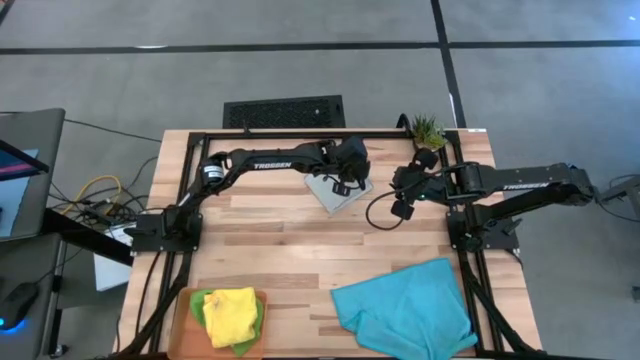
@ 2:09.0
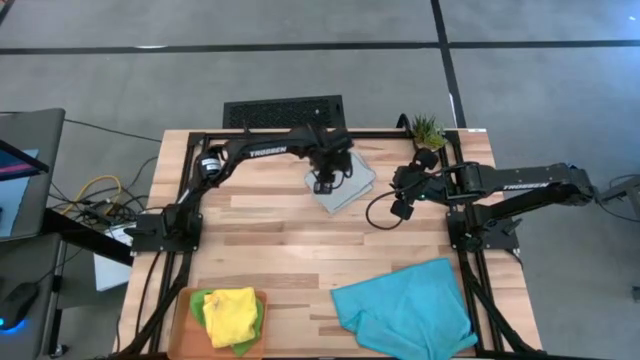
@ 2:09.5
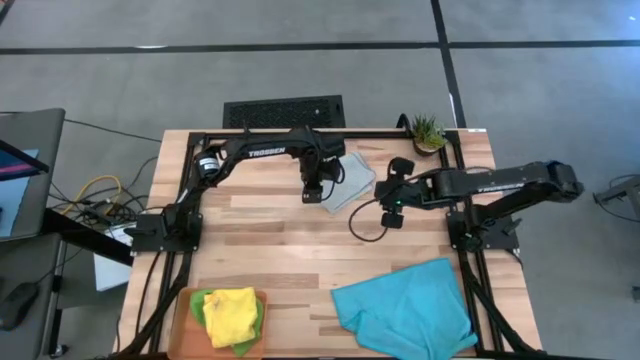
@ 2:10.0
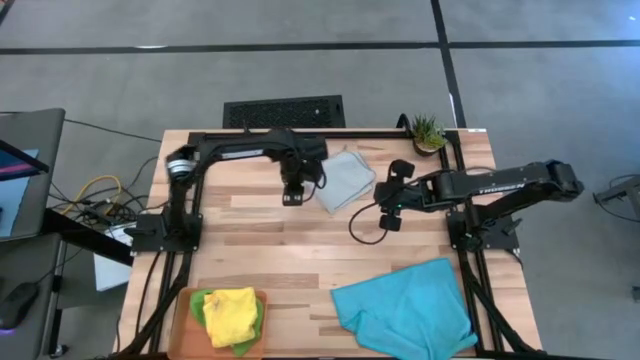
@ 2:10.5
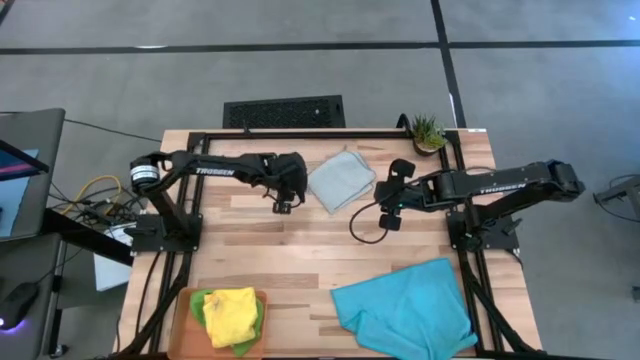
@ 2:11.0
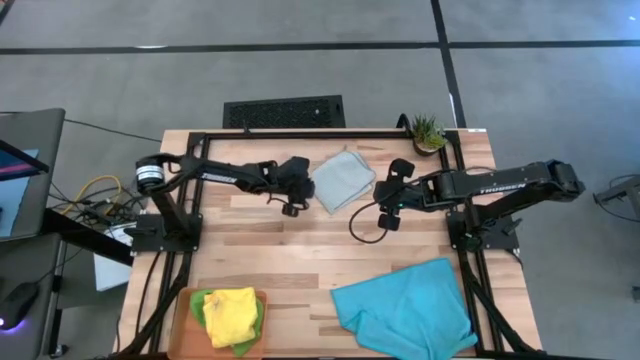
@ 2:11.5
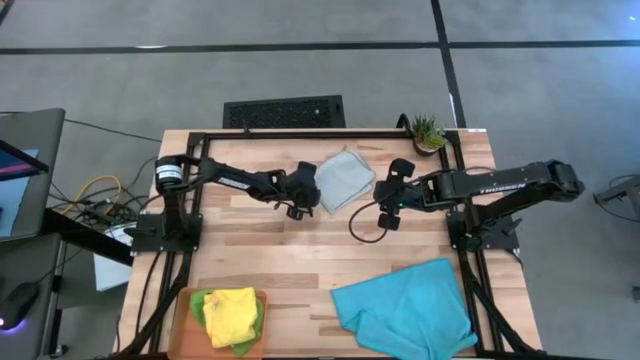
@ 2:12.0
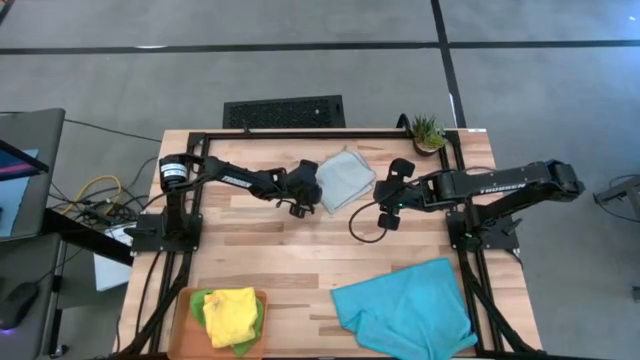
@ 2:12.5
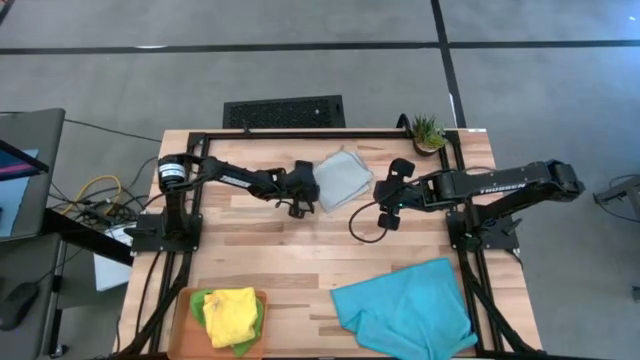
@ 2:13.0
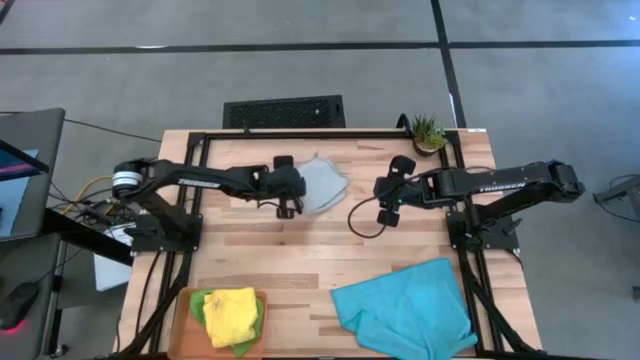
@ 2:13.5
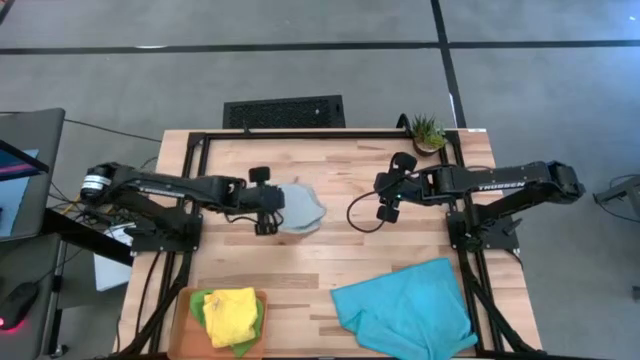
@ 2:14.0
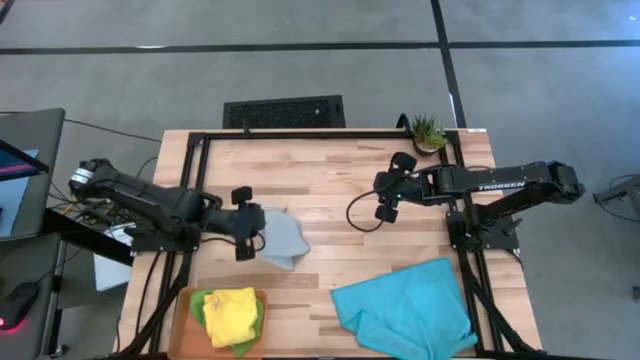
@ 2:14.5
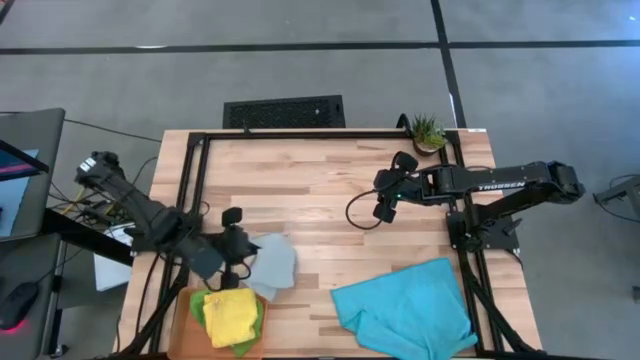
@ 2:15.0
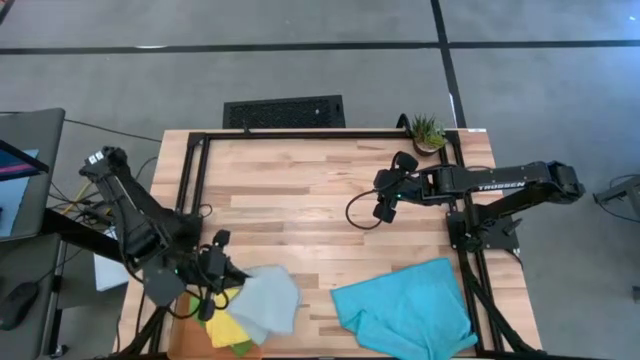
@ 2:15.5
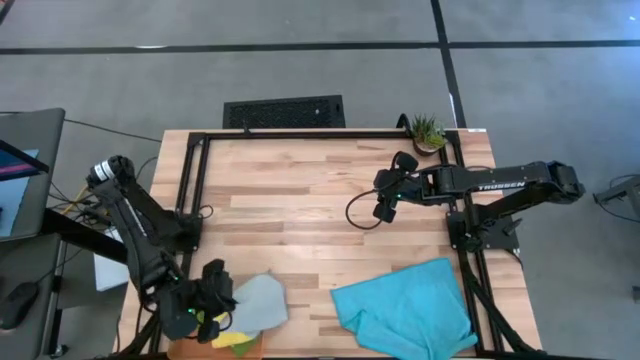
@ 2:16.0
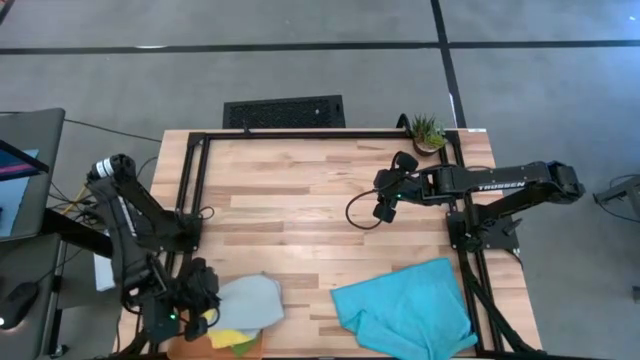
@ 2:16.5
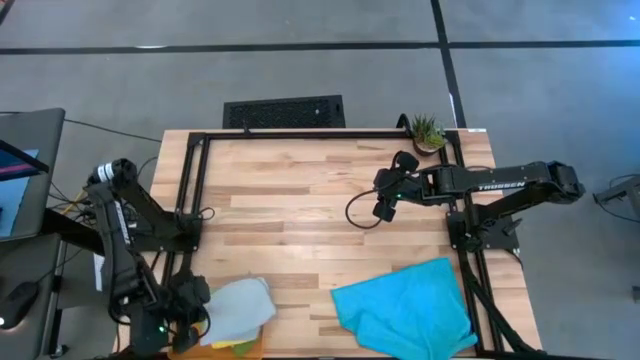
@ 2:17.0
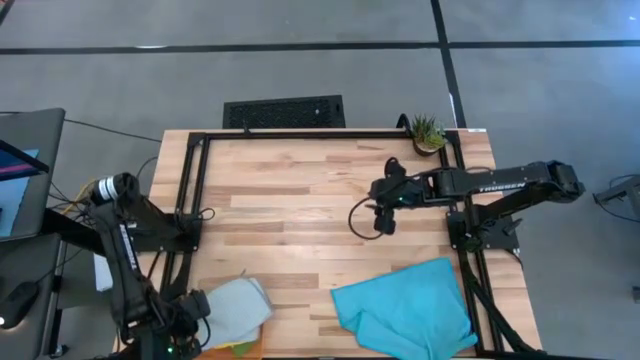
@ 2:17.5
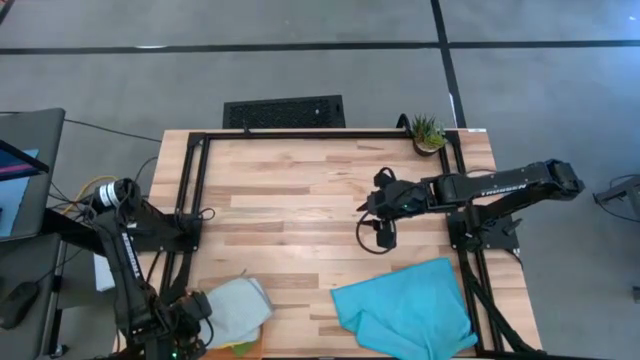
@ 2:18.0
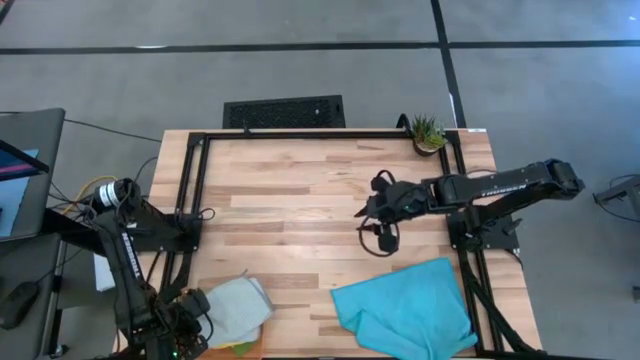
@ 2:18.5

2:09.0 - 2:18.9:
Task: Fold microfiber towels
Put the folded gray towel into the orange bin

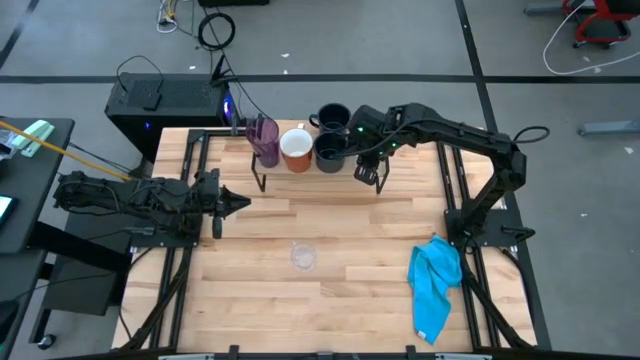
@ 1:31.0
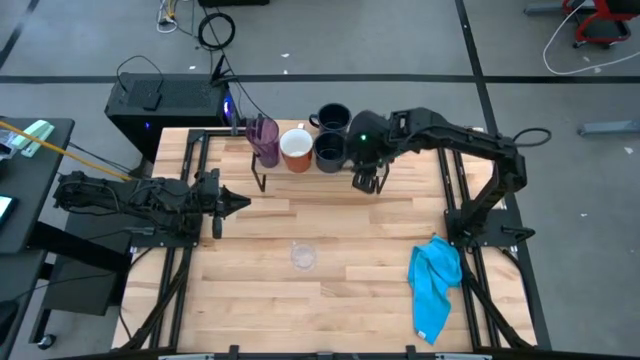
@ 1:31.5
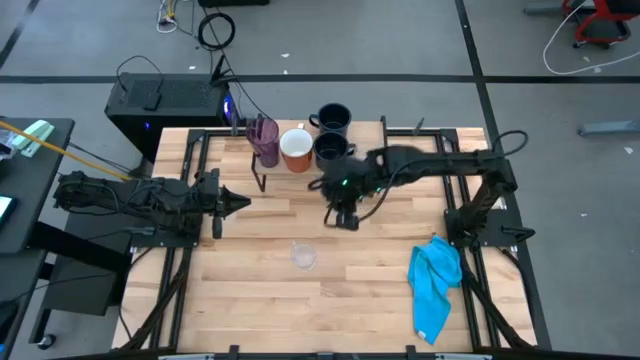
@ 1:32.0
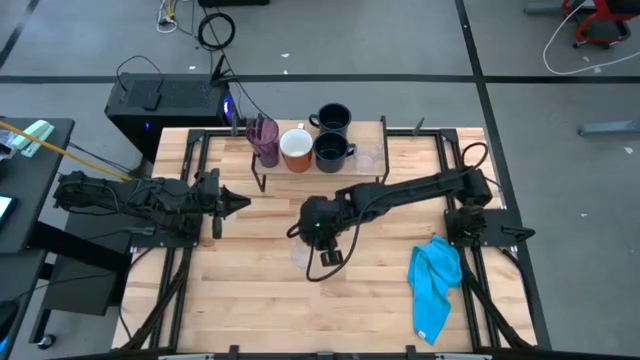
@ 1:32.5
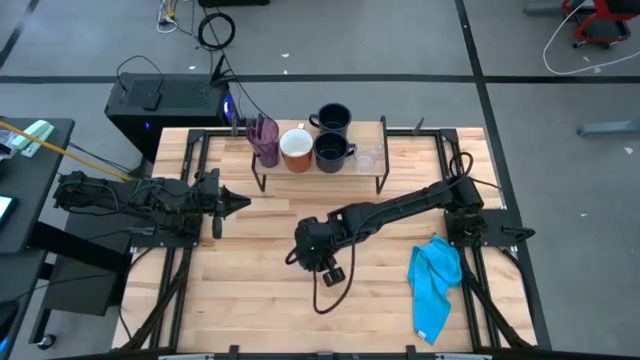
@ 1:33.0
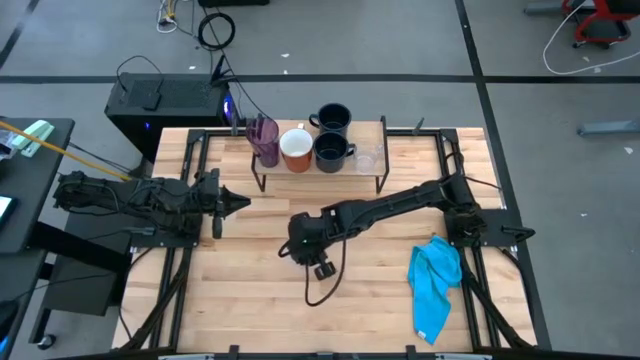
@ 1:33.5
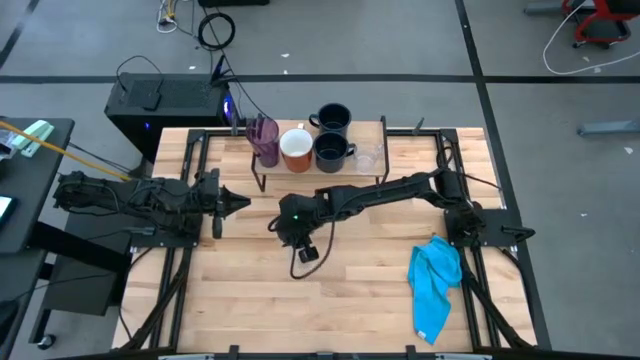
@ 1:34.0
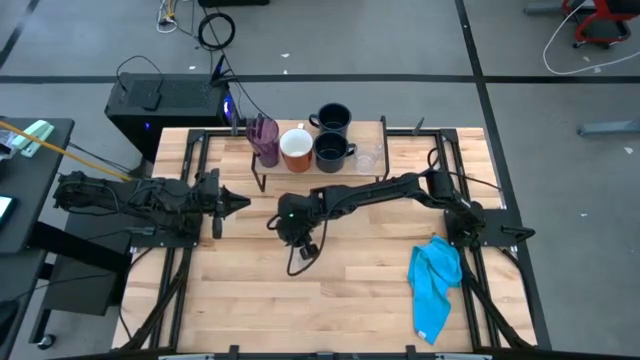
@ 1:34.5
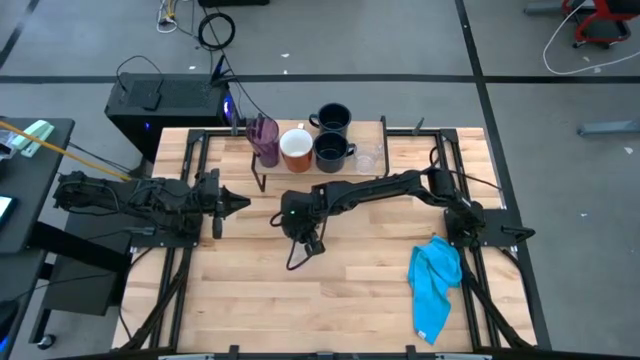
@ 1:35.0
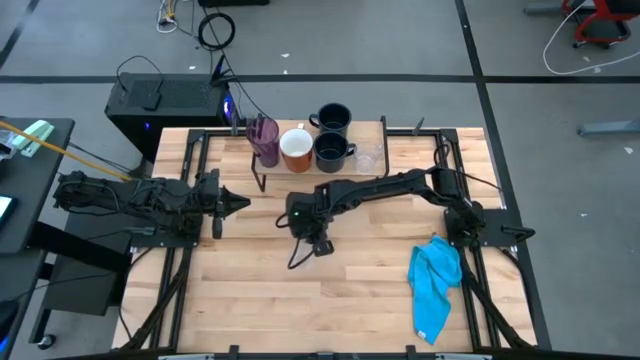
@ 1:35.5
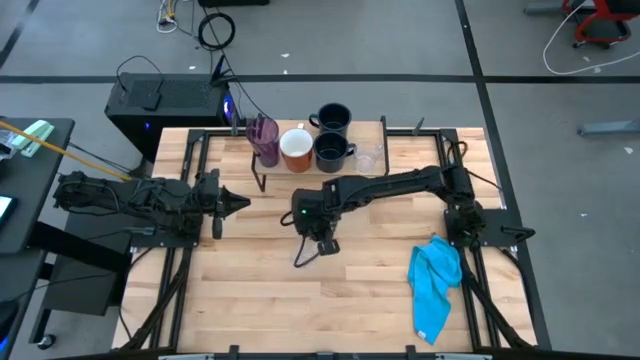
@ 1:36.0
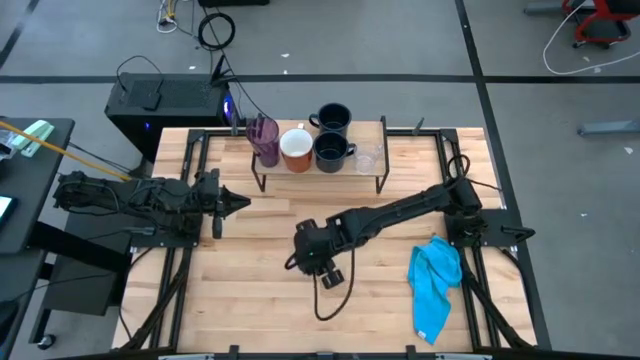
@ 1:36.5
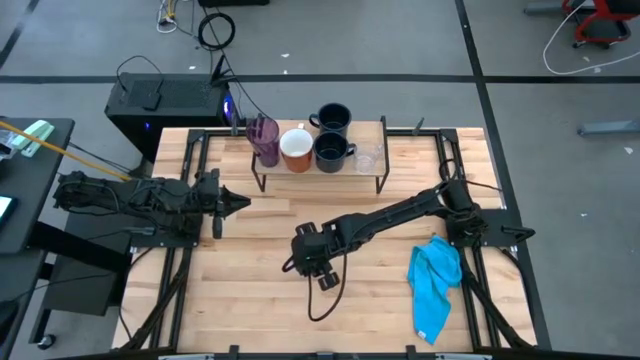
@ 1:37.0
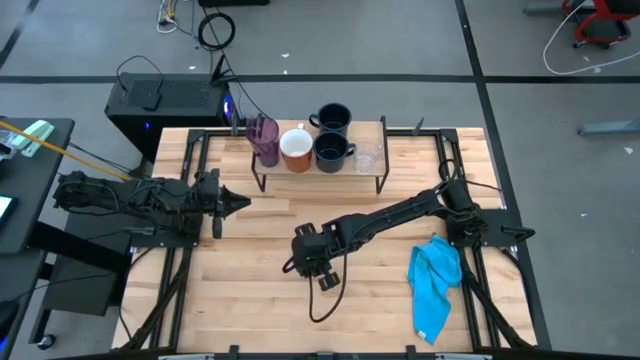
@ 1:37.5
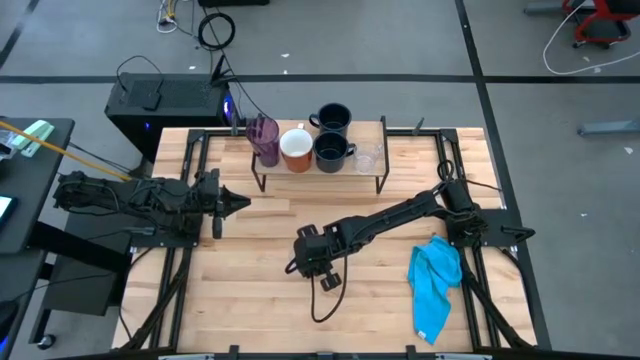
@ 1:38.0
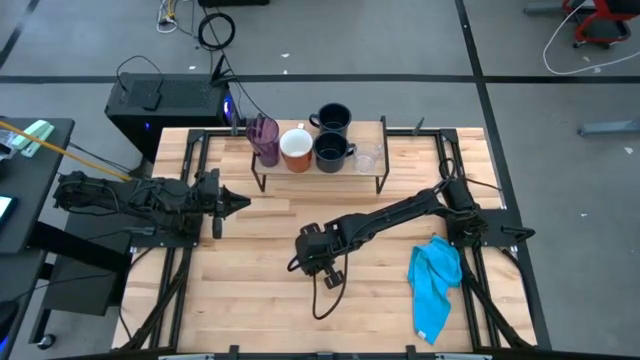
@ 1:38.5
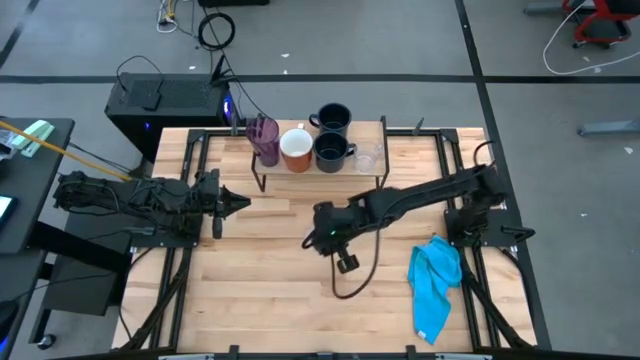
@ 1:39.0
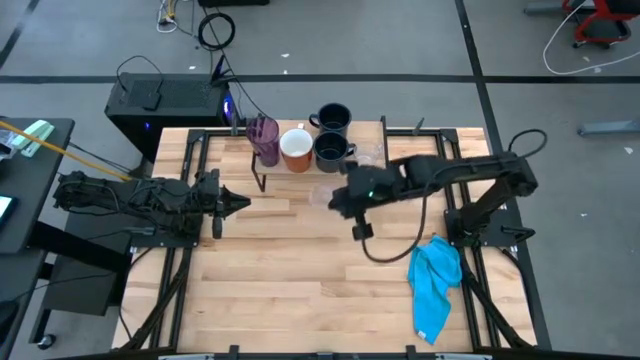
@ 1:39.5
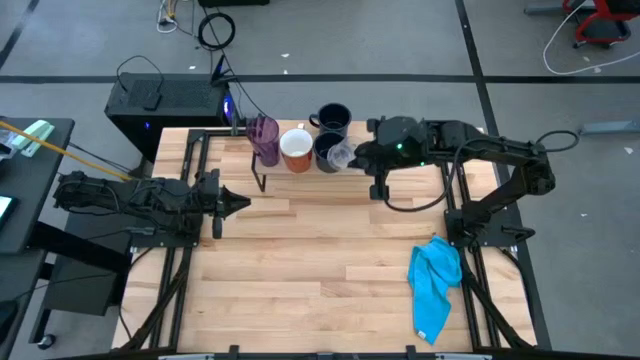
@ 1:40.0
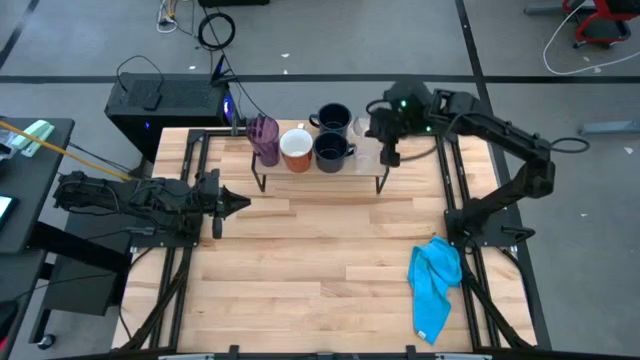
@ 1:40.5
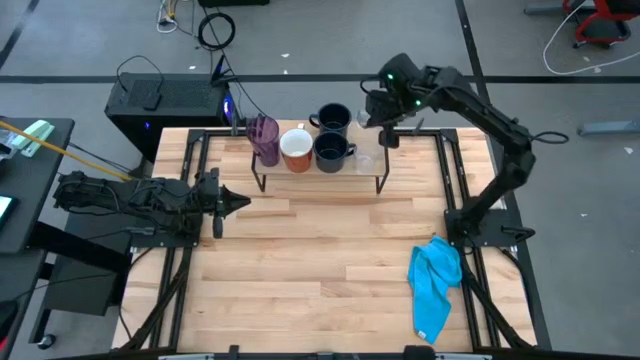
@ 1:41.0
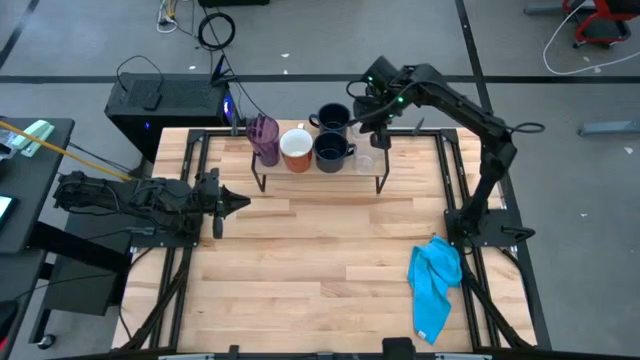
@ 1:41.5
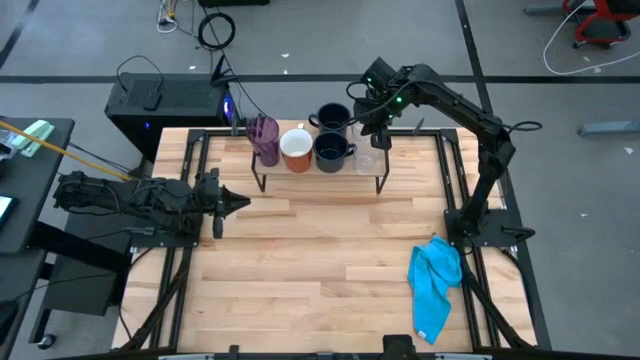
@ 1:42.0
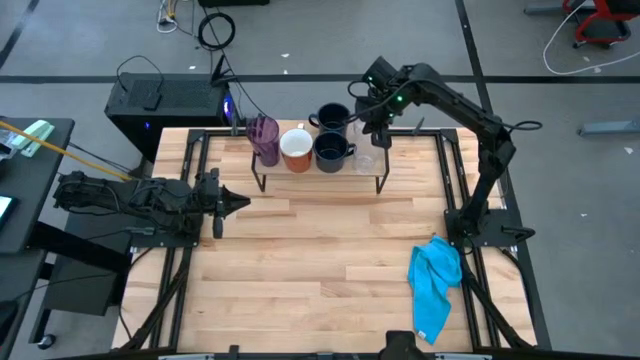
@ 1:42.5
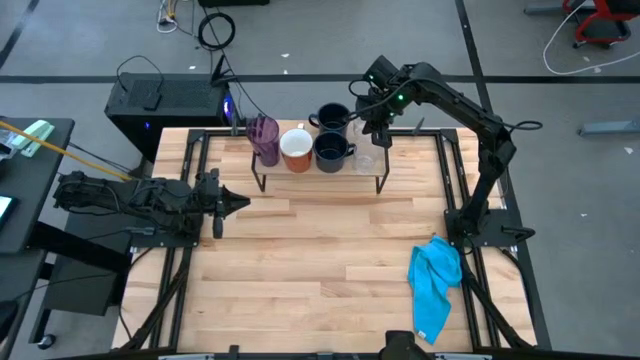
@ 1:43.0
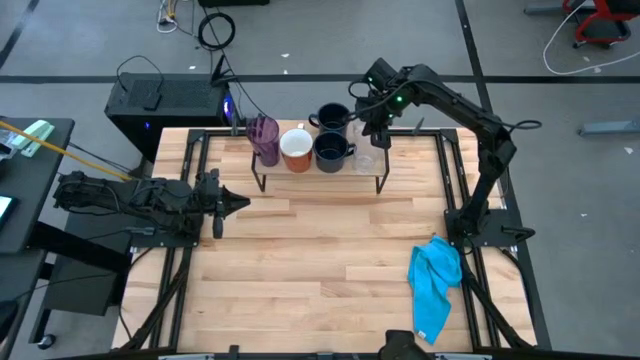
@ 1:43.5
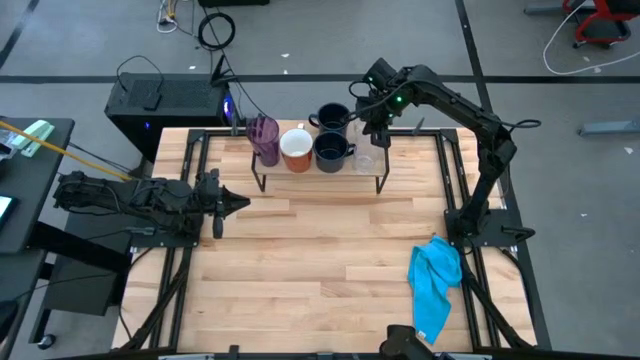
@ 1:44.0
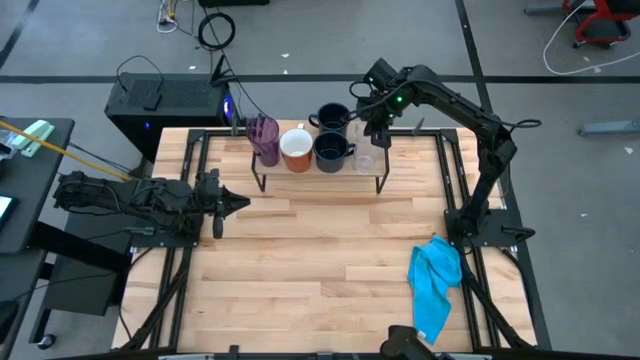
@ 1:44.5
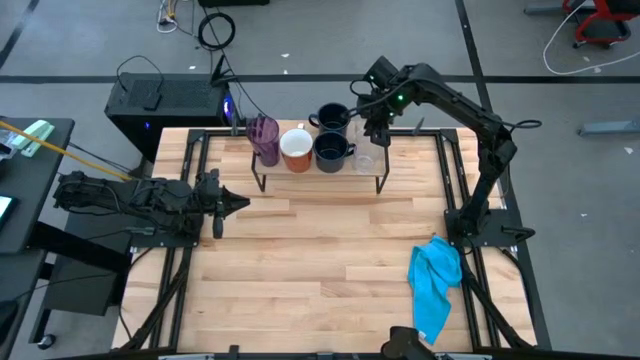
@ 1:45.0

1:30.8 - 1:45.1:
Task: Stack small to large cups/mugs on shelf
Put the transparent mug on the shelf
